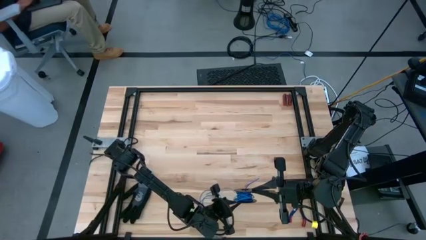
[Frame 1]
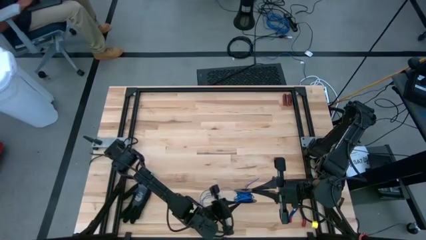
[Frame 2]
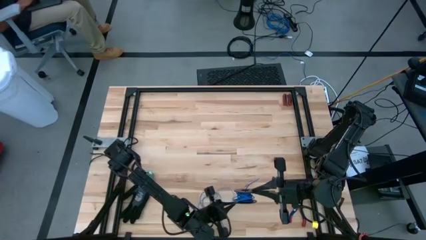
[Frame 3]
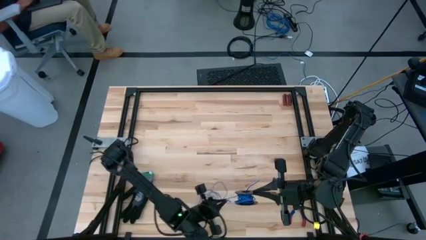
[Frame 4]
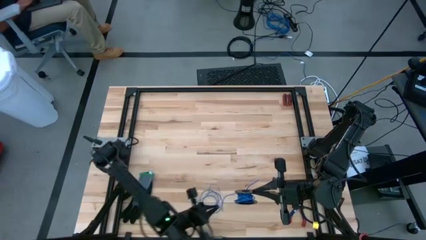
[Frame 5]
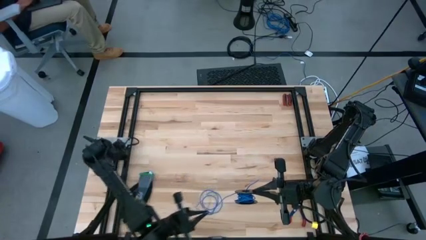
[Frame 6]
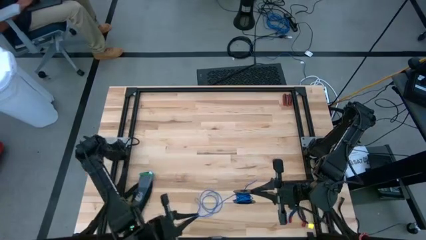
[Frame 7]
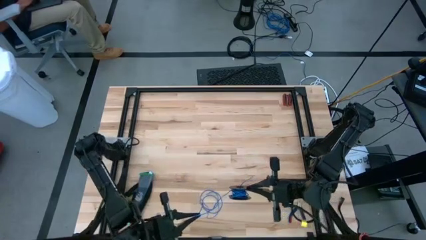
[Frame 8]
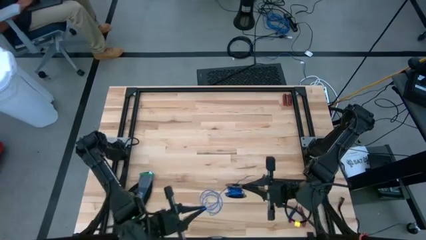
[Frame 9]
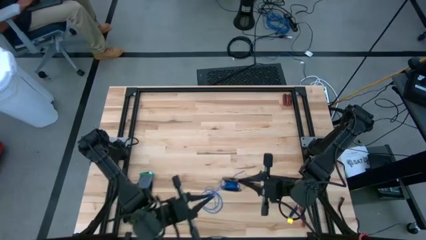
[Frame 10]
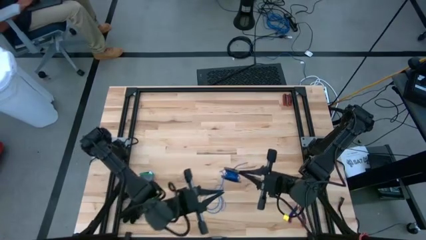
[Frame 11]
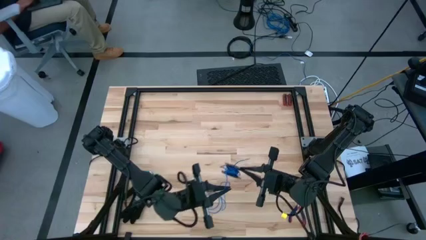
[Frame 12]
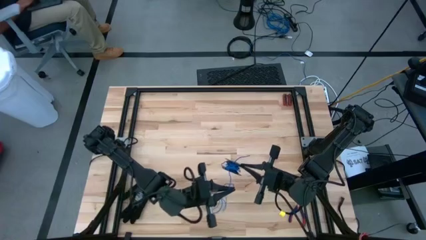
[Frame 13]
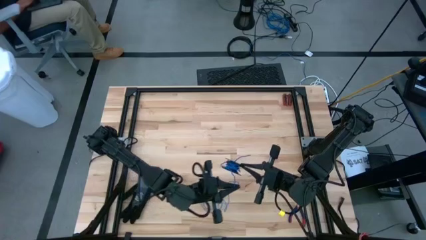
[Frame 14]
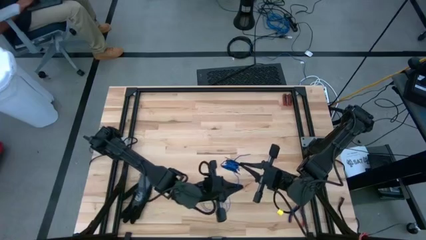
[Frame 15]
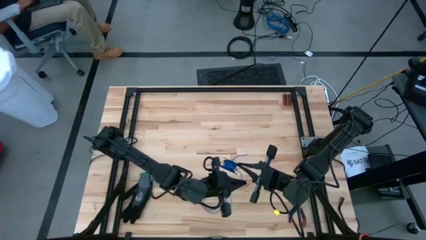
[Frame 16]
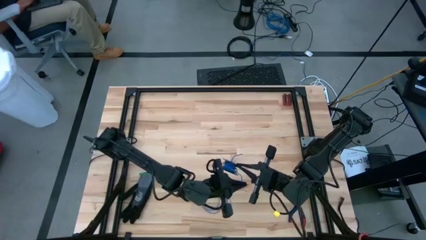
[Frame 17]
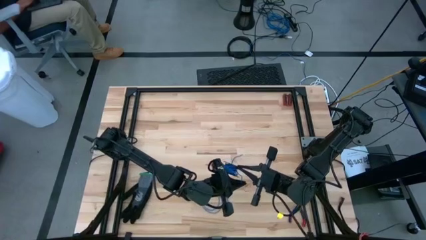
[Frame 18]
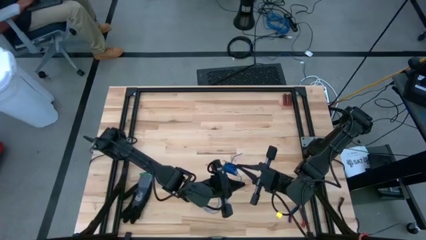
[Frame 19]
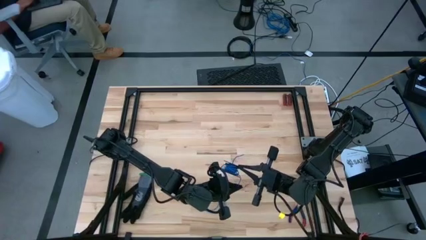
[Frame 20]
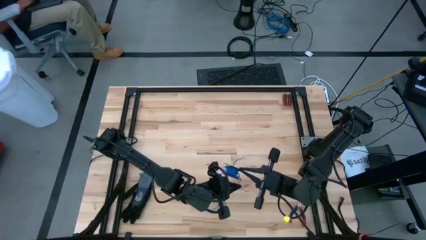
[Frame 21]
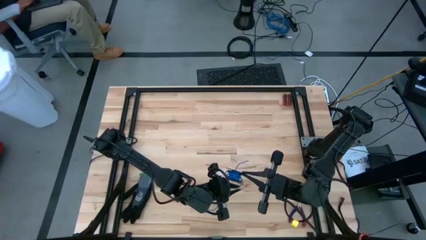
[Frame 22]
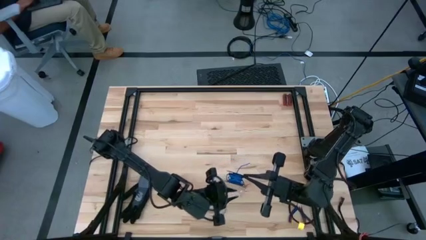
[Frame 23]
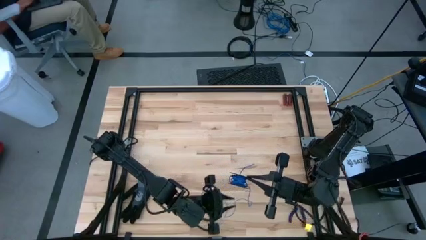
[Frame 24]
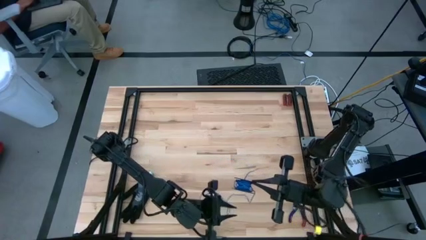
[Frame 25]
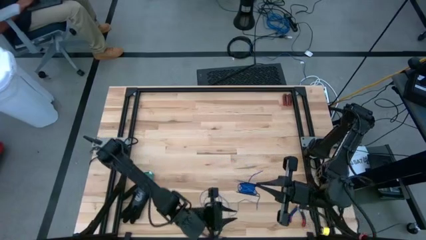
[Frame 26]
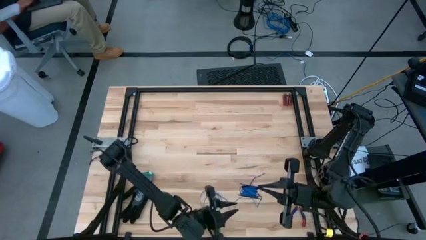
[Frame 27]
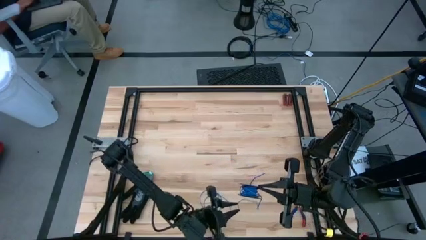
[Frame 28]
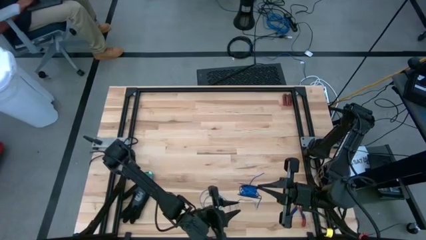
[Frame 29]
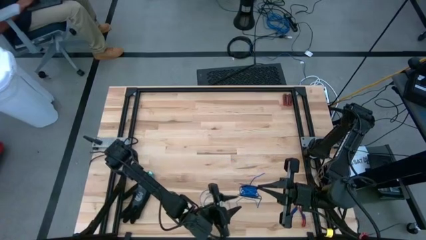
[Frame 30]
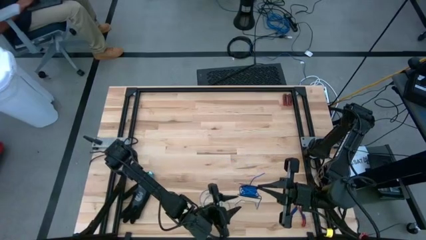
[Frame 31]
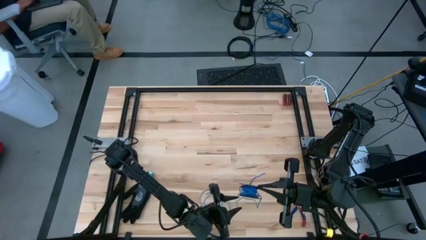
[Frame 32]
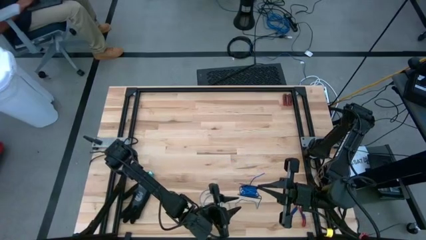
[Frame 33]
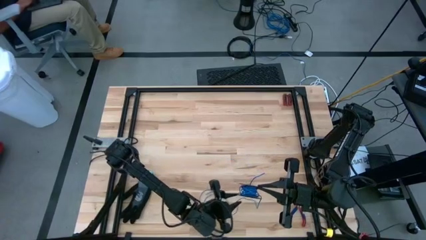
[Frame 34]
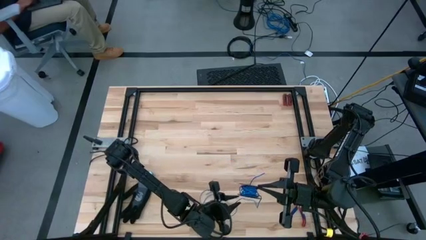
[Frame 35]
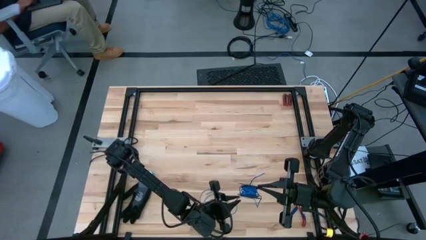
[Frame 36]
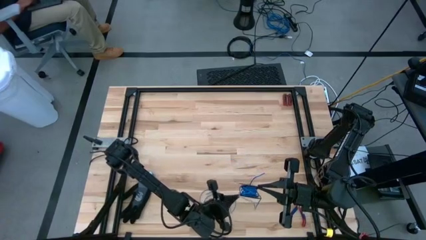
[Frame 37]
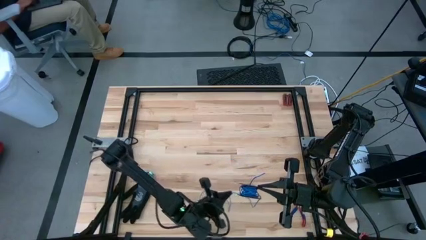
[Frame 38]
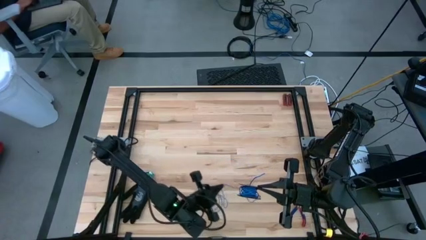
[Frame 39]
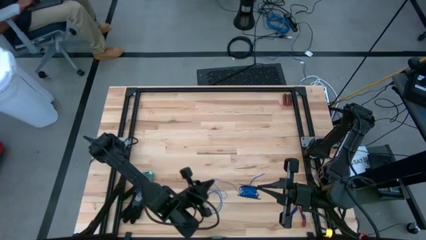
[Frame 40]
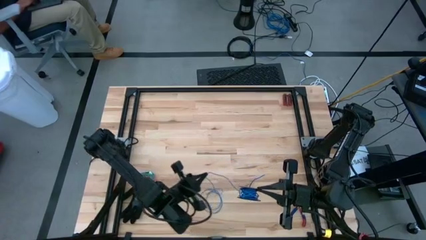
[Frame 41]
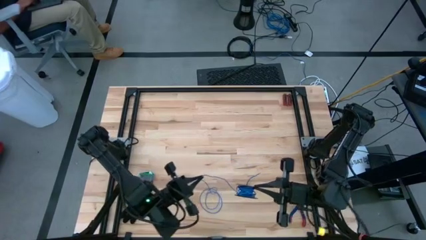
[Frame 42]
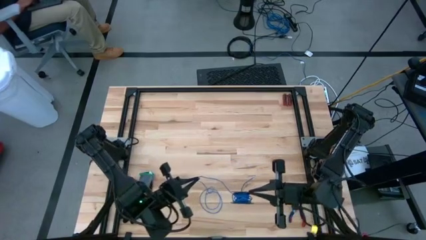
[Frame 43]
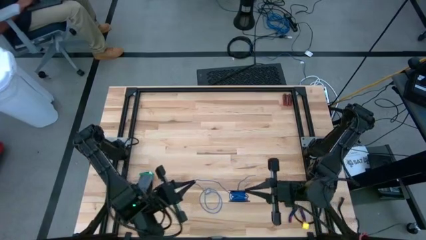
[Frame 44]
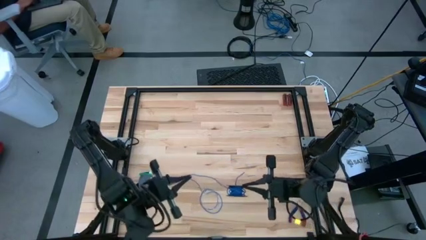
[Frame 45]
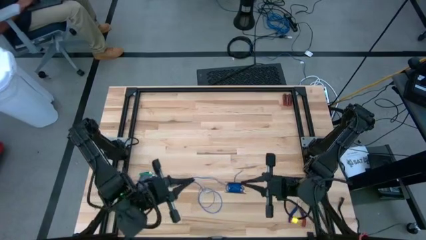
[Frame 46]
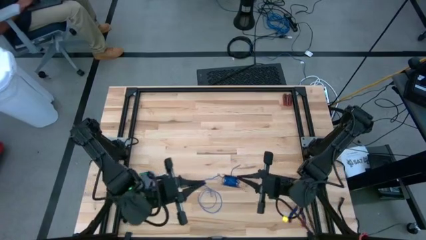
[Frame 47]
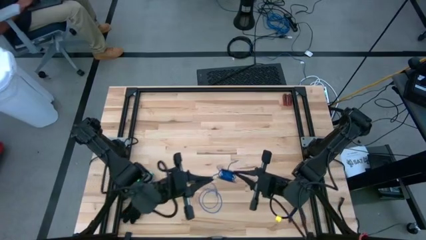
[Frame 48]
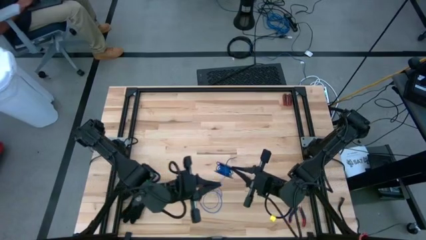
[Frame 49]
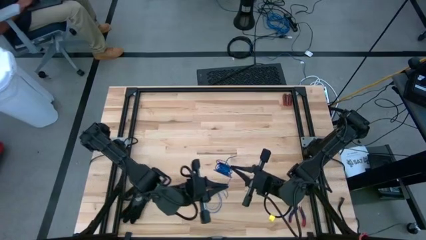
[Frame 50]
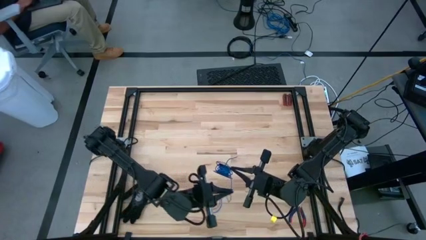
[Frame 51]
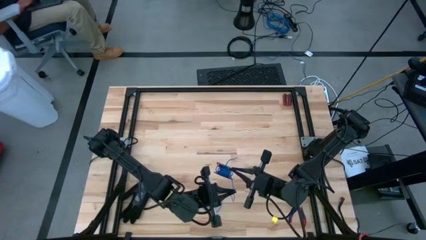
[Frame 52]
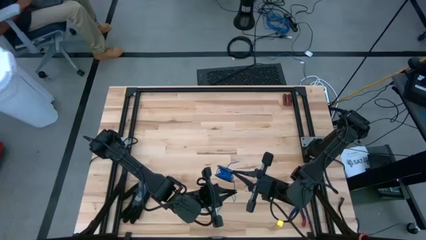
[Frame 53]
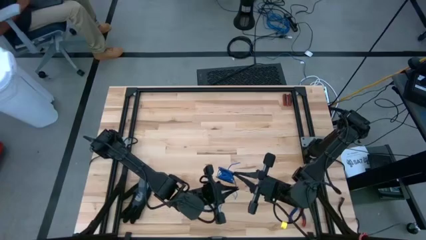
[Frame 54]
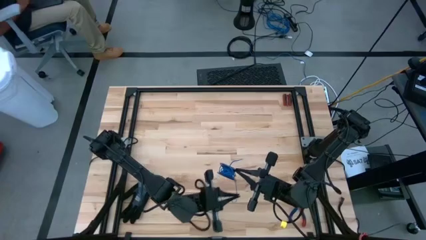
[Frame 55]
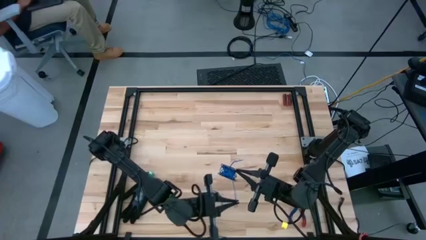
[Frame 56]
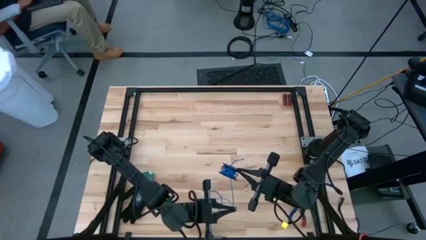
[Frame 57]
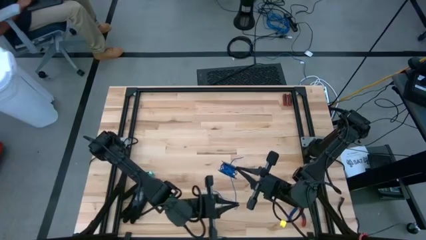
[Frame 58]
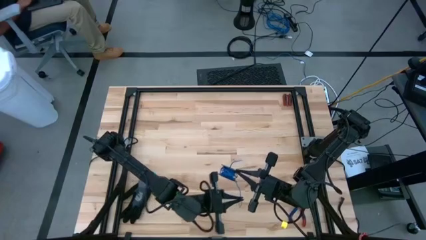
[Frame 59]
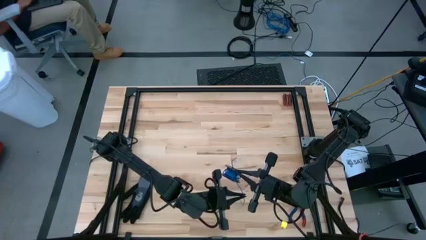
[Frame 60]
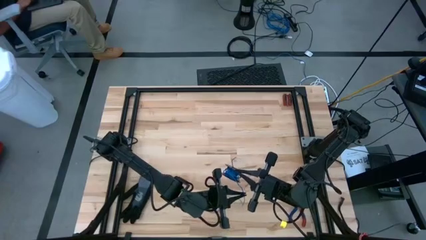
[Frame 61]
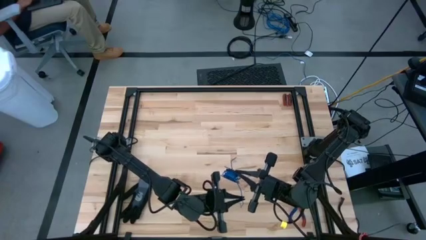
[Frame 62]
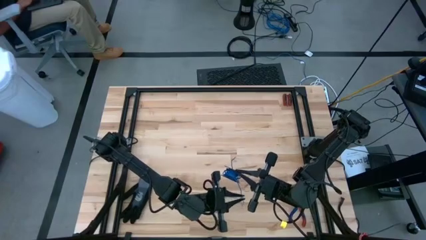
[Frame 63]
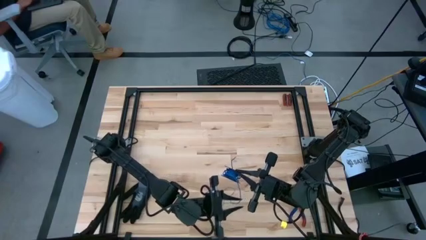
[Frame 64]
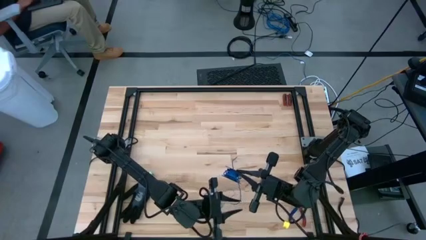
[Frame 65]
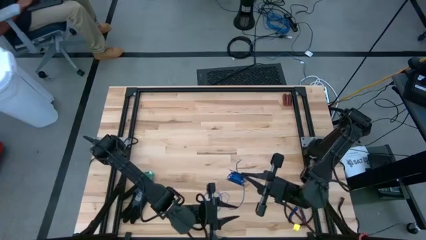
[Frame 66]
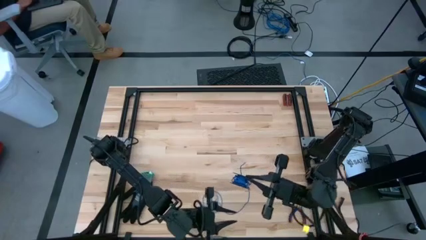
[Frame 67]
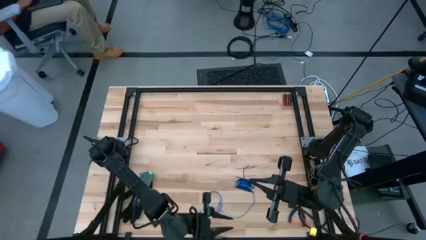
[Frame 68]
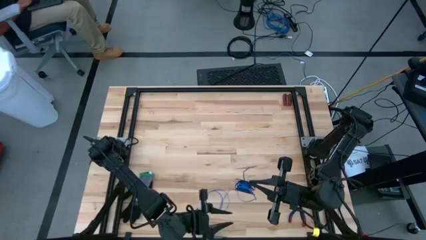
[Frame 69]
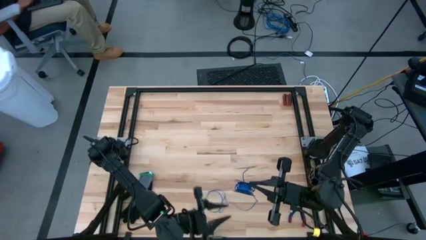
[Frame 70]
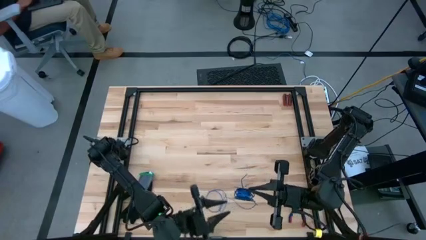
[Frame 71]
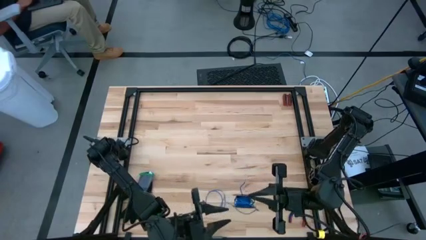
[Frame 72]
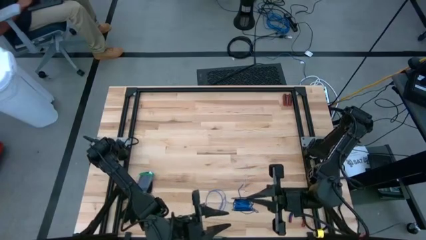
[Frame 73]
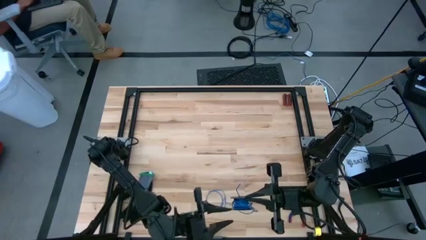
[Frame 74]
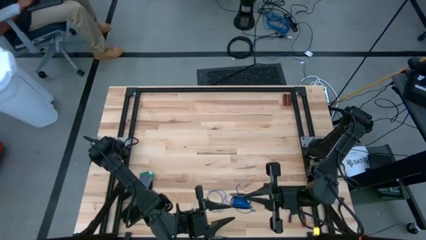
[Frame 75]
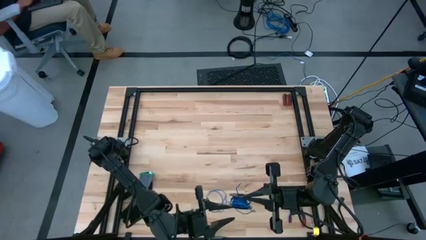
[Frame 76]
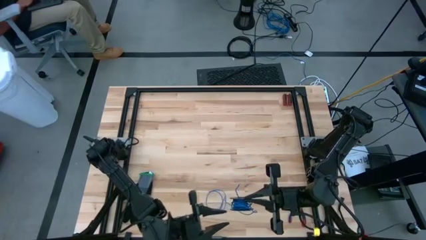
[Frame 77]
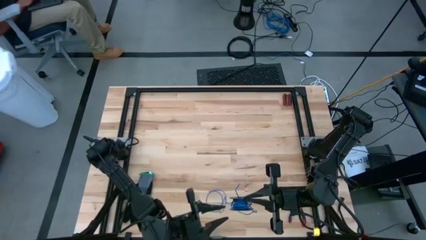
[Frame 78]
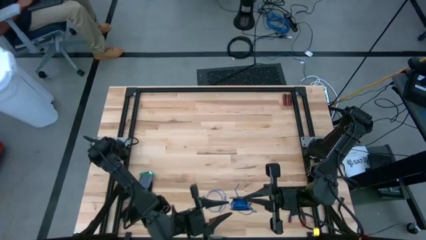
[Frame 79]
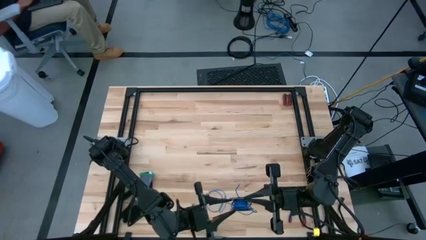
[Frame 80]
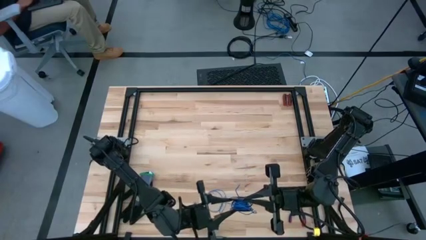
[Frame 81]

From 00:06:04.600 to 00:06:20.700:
Task: Coil cords
Coil the blue wire onto the spool
